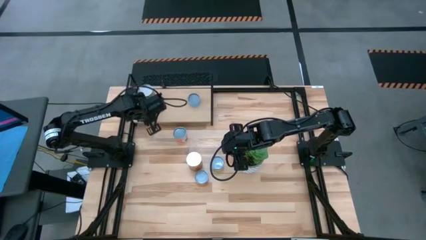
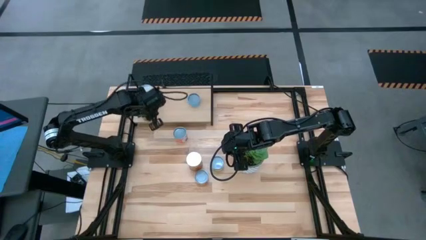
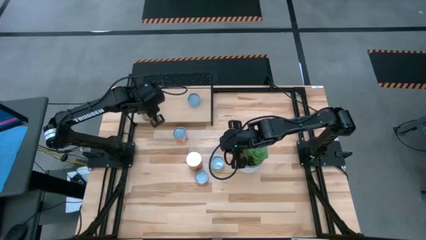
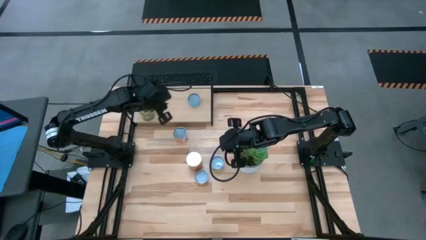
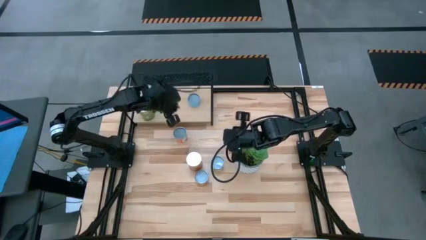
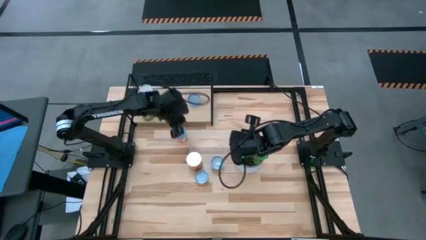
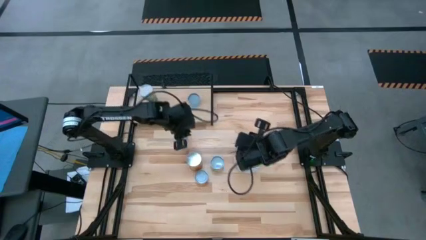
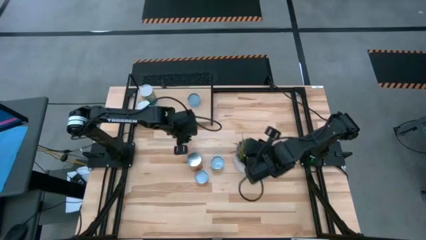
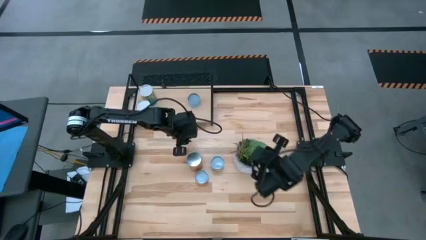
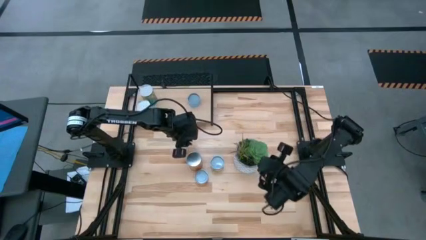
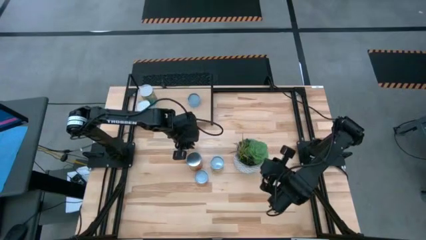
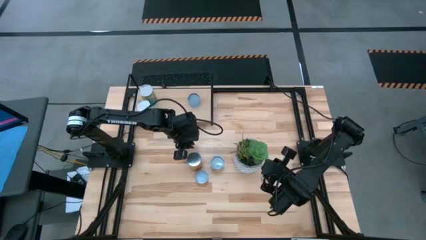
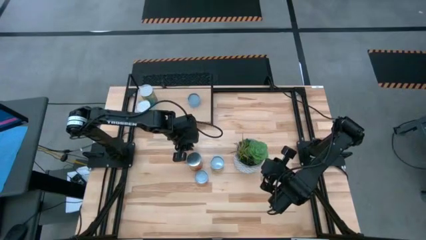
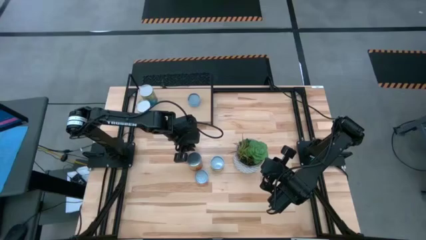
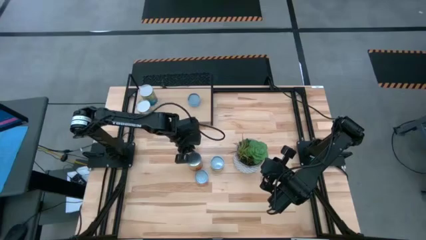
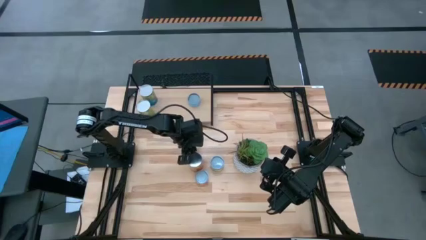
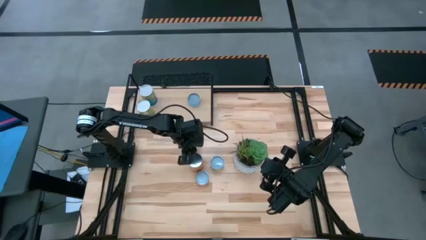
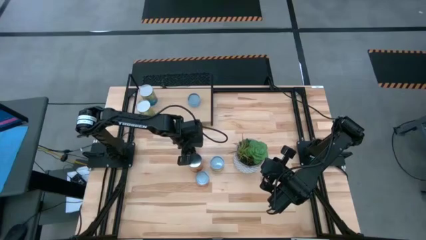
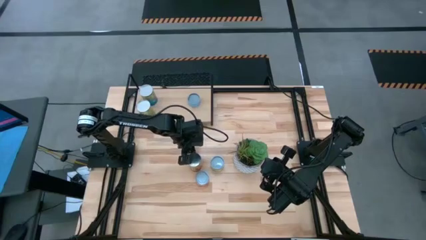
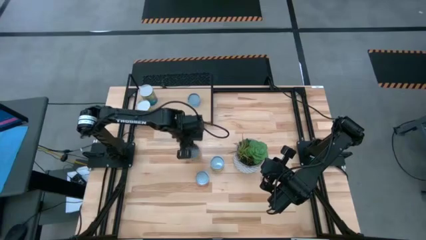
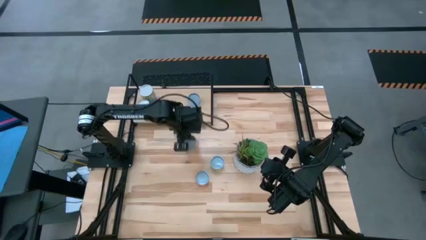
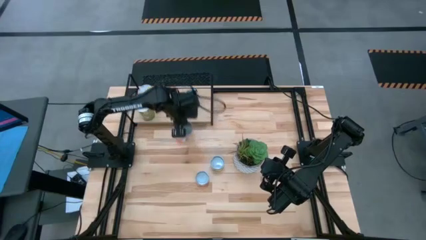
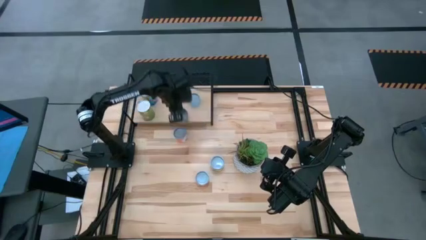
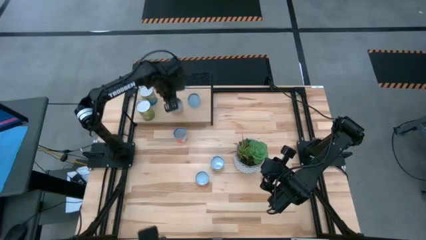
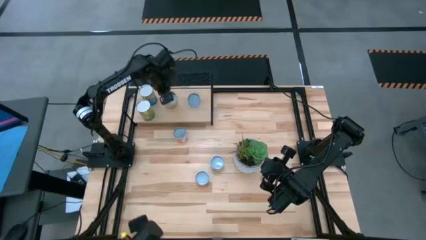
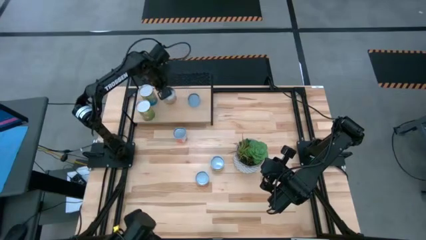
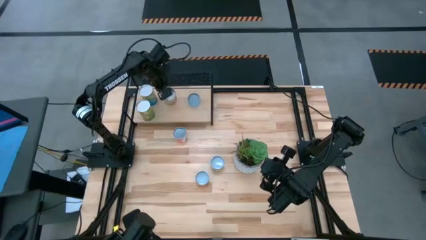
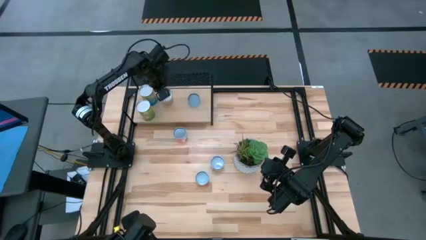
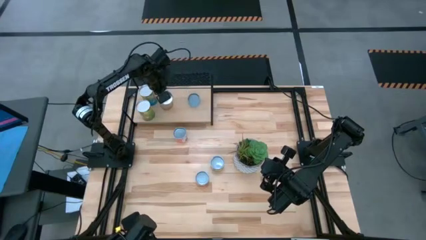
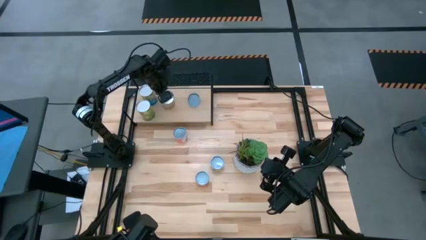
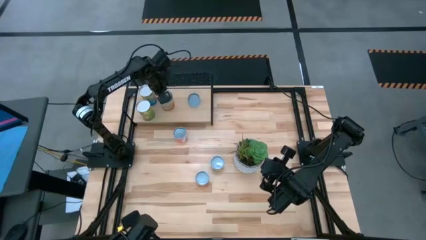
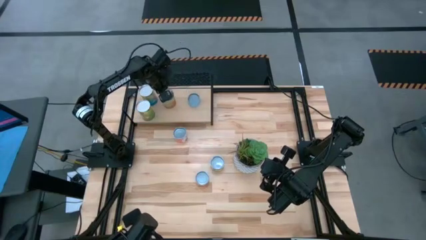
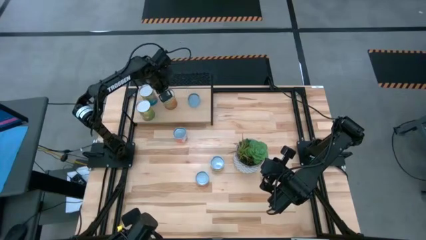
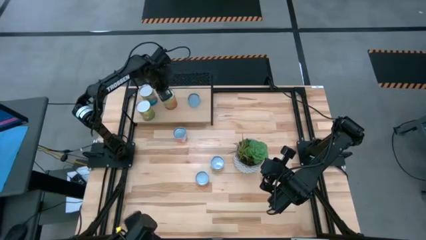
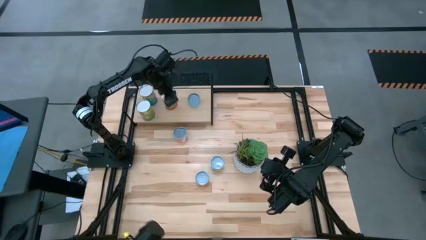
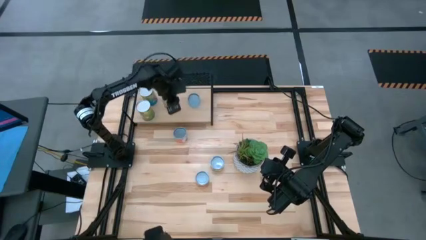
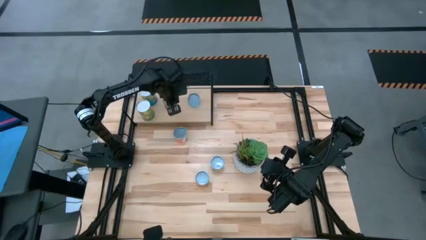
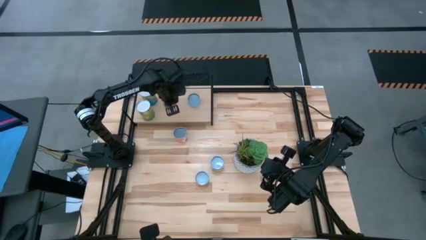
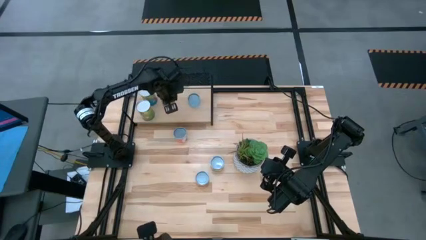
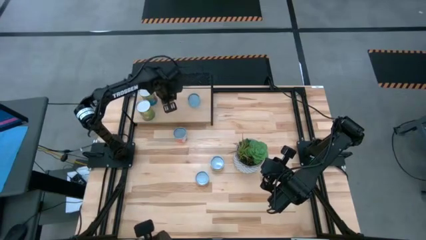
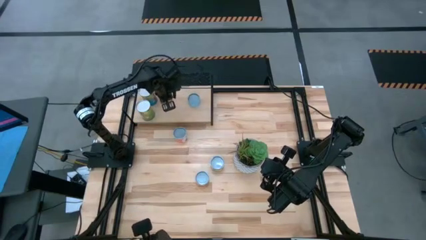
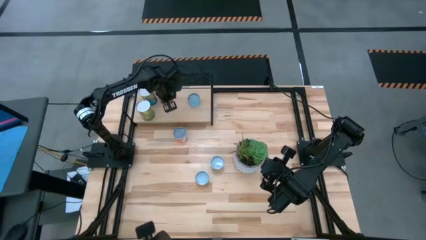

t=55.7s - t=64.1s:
Task: Pick and place cans onto a shelf
Put the canned green beans on the shelf

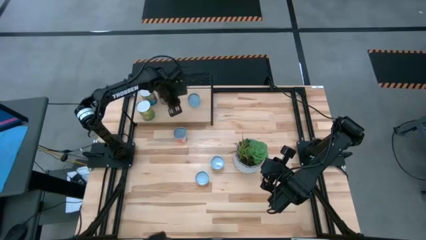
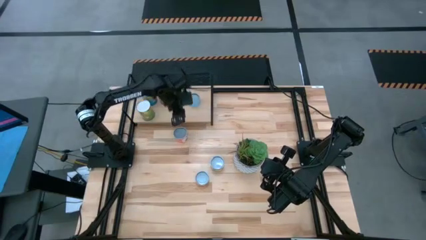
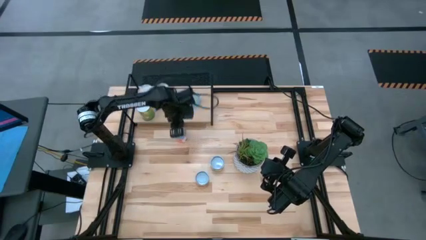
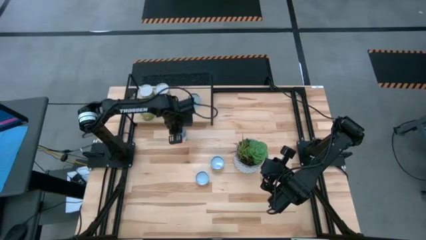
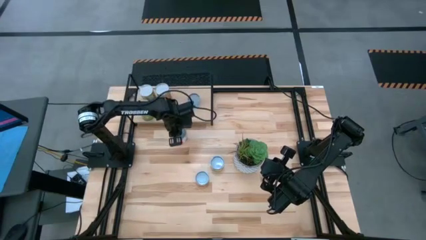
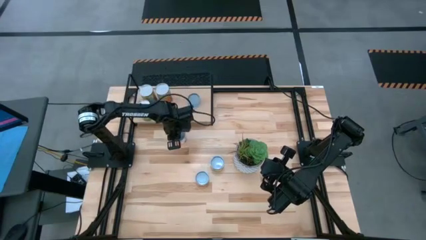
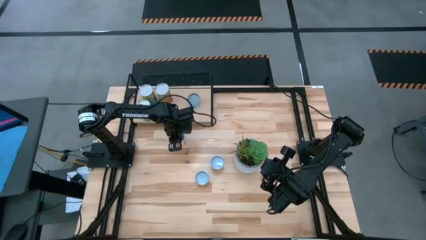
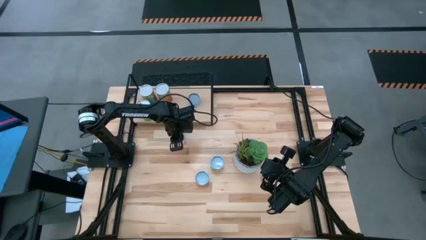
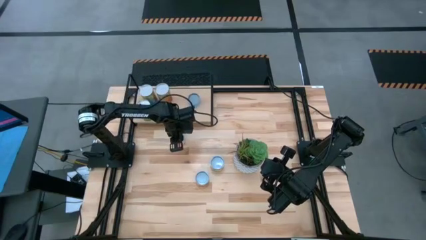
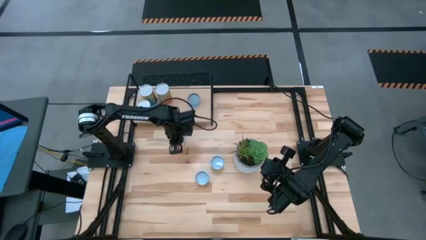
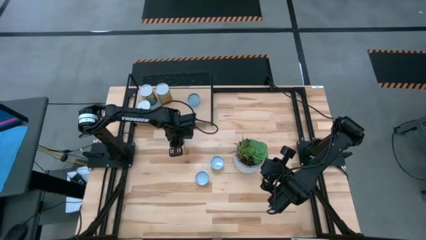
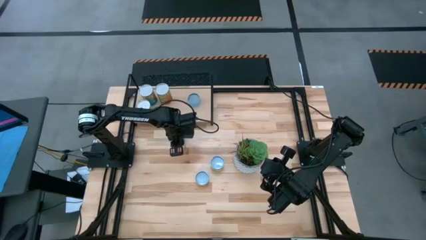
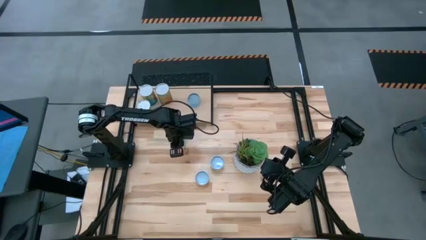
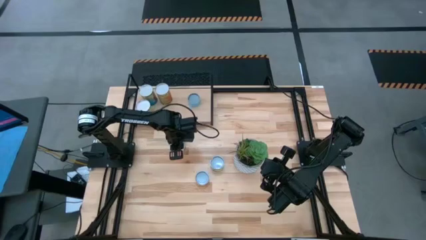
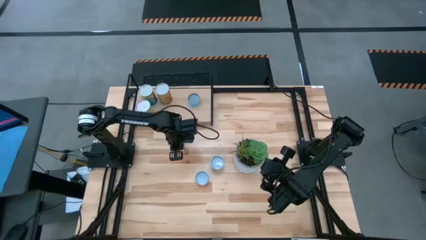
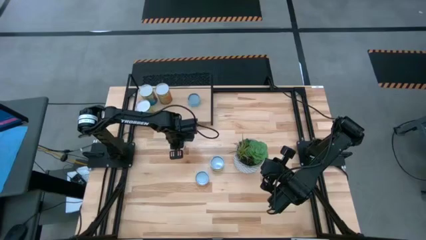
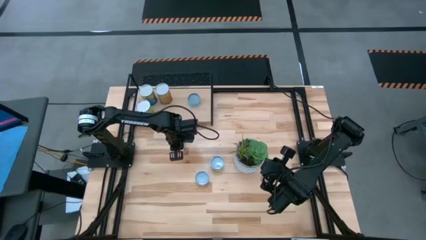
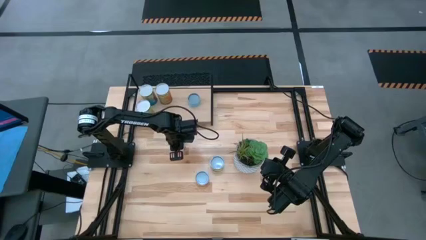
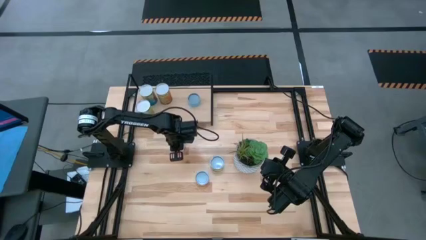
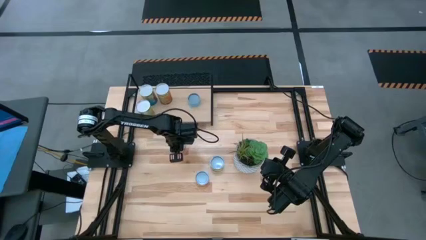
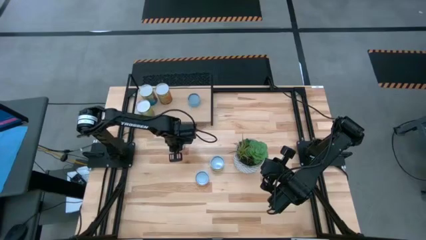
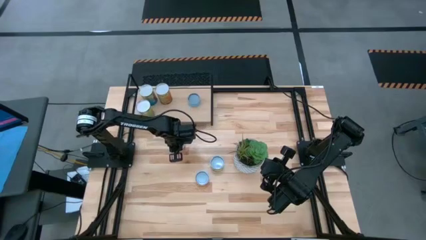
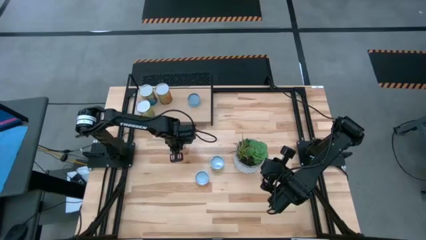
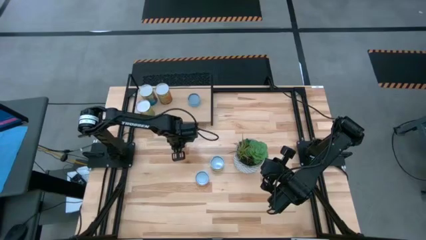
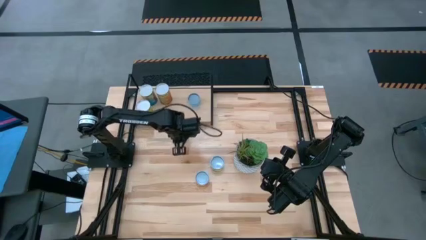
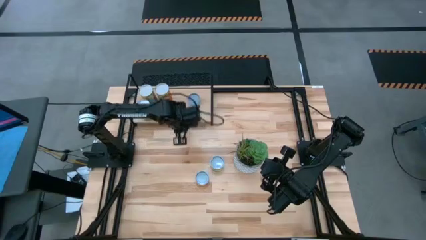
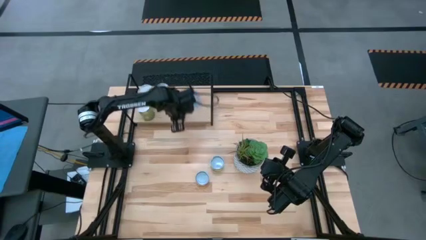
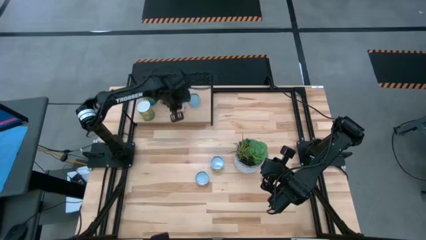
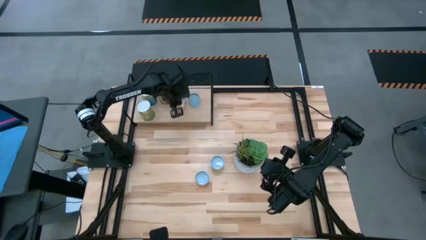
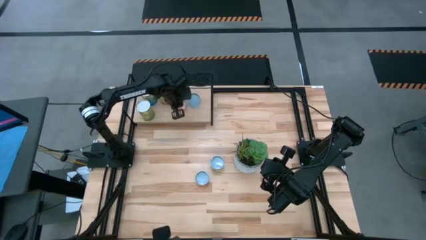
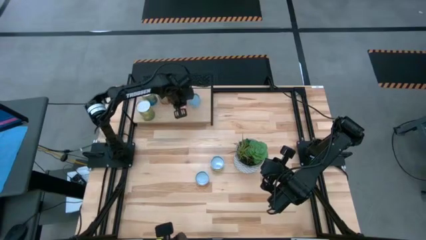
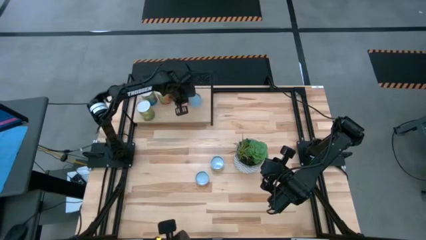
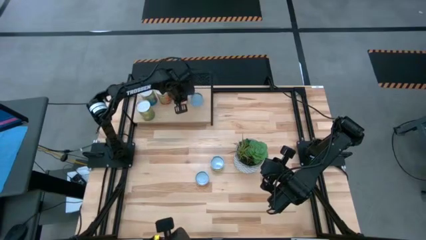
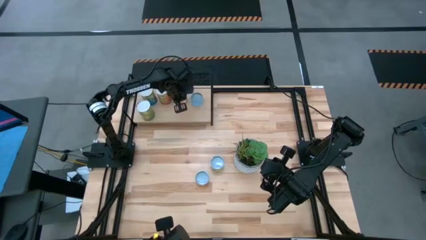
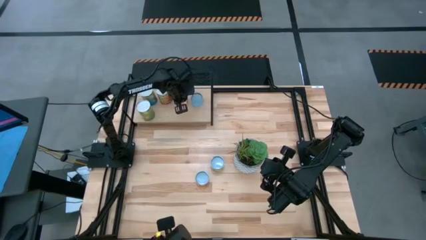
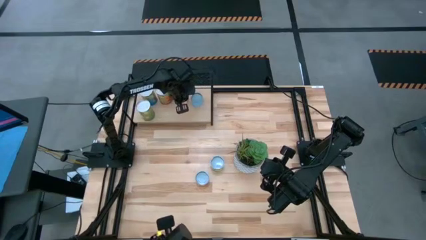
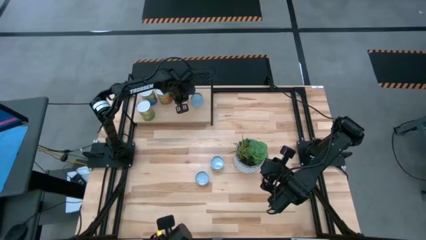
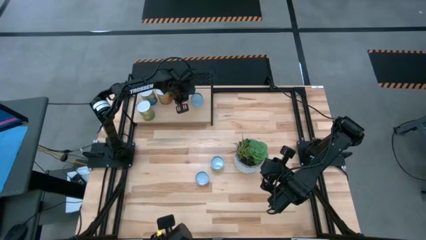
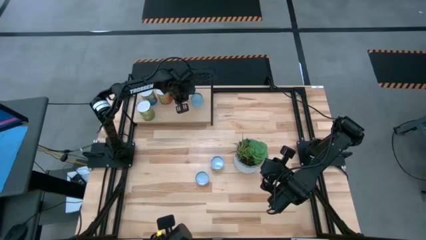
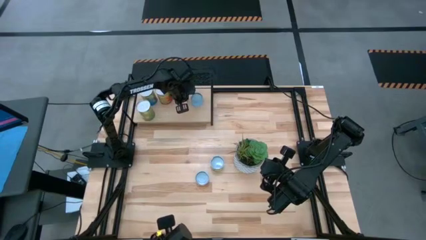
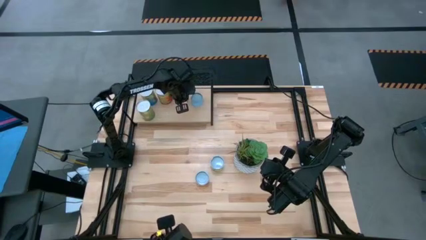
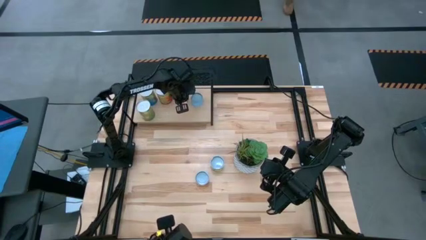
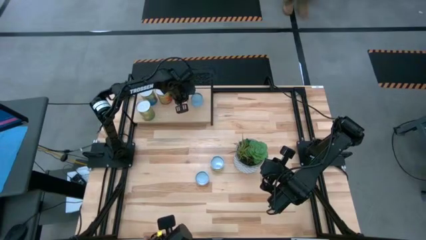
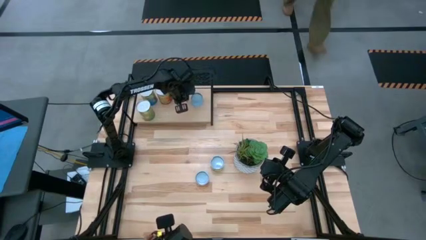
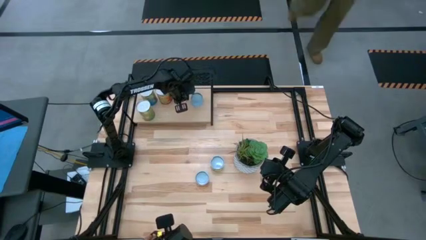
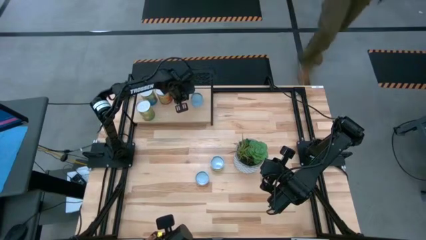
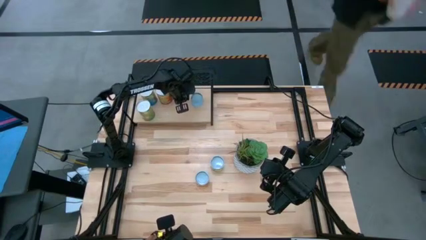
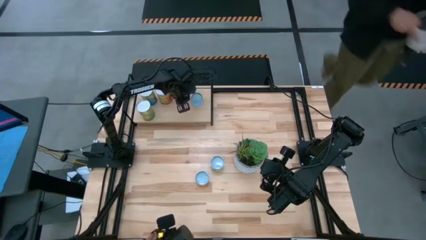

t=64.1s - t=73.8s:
Put the canned meatballs on the shelf
